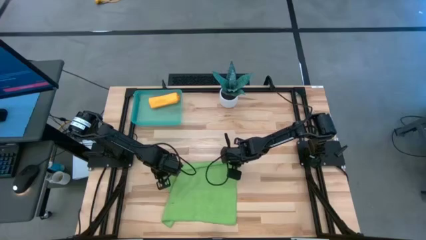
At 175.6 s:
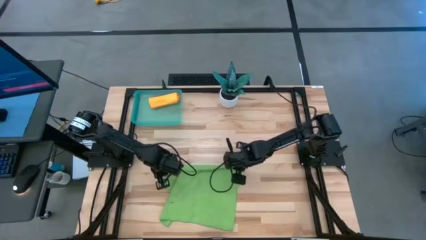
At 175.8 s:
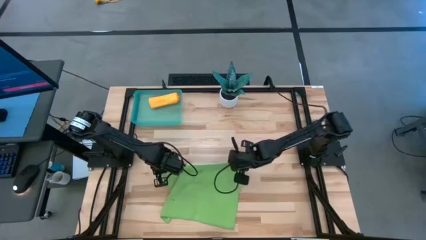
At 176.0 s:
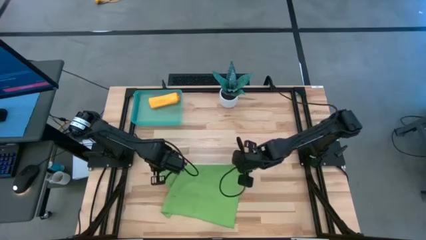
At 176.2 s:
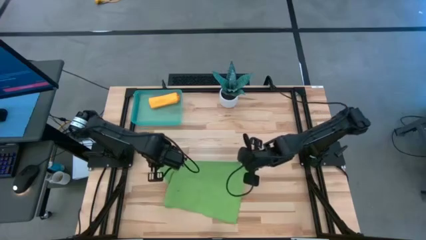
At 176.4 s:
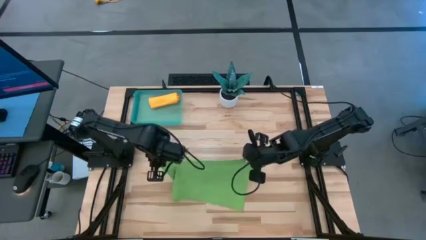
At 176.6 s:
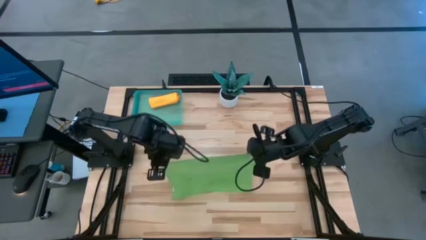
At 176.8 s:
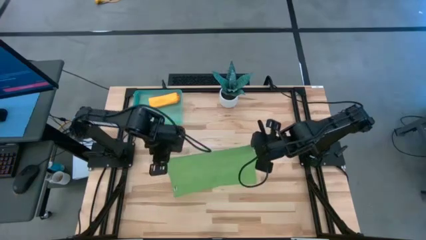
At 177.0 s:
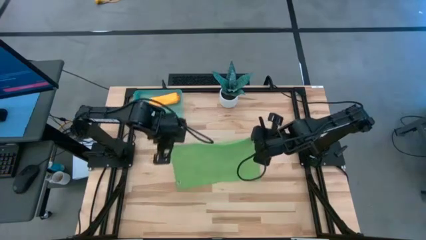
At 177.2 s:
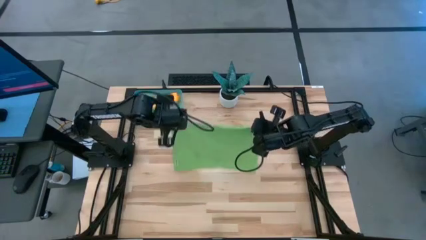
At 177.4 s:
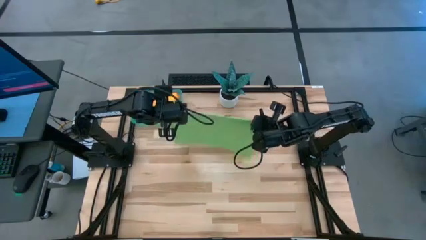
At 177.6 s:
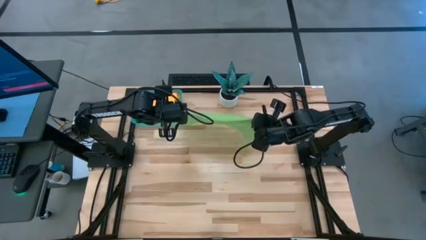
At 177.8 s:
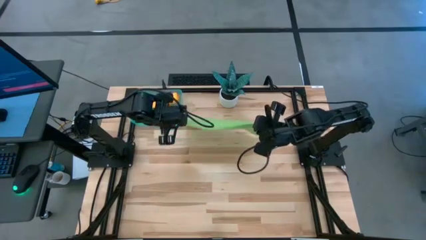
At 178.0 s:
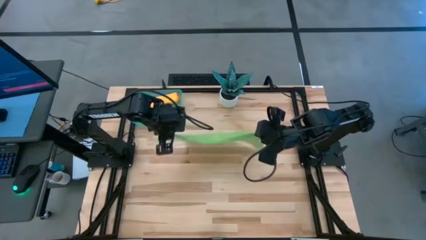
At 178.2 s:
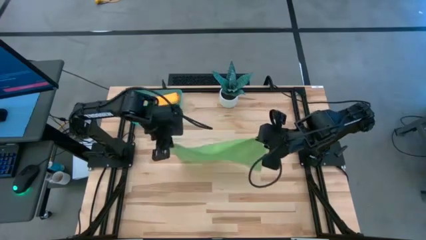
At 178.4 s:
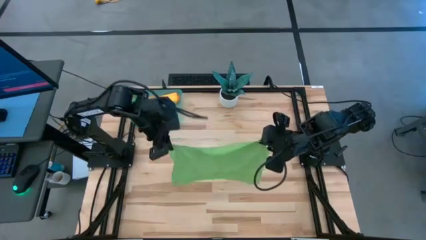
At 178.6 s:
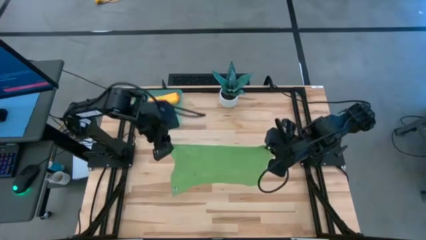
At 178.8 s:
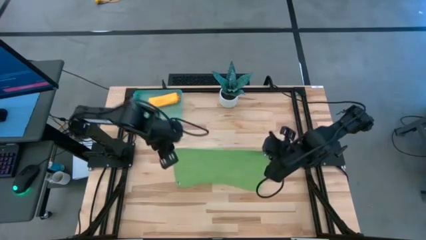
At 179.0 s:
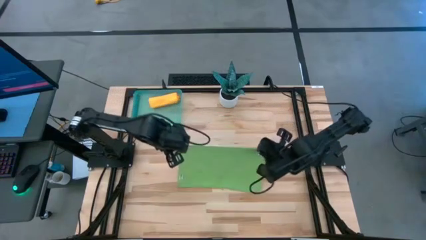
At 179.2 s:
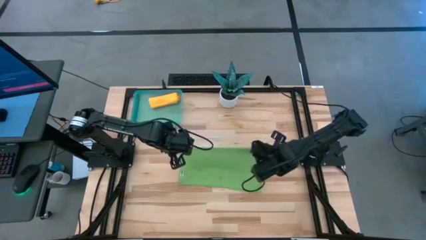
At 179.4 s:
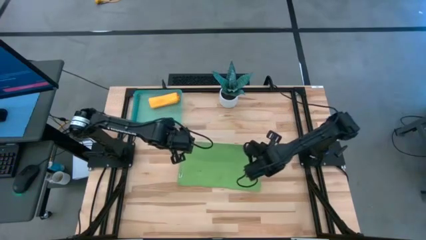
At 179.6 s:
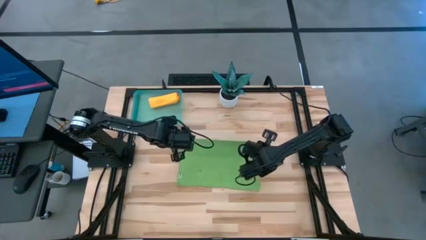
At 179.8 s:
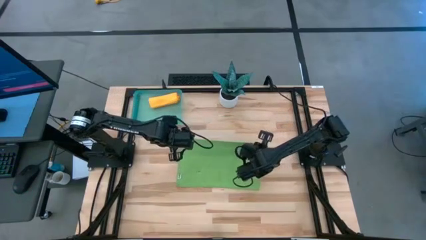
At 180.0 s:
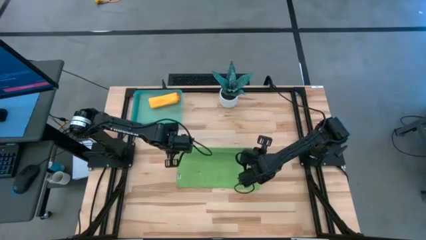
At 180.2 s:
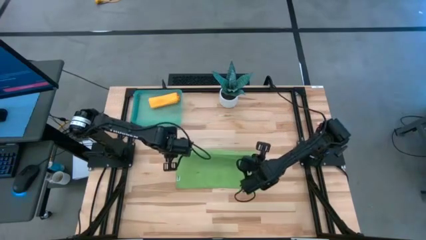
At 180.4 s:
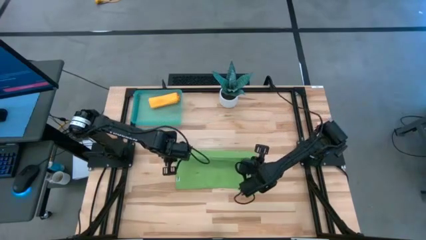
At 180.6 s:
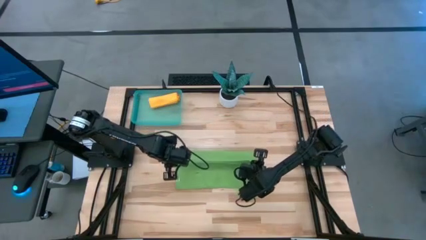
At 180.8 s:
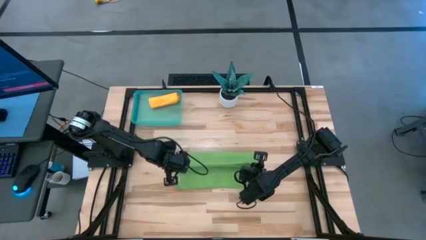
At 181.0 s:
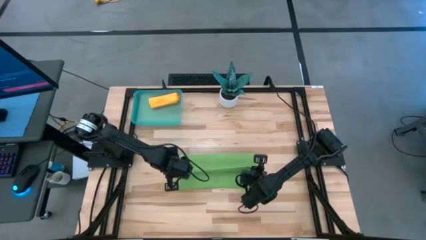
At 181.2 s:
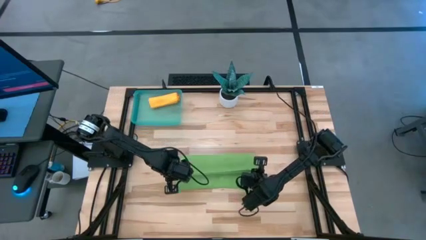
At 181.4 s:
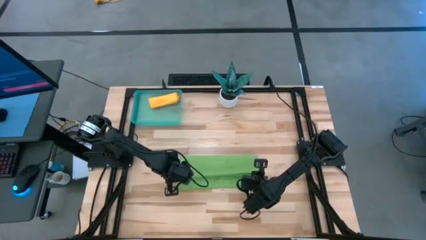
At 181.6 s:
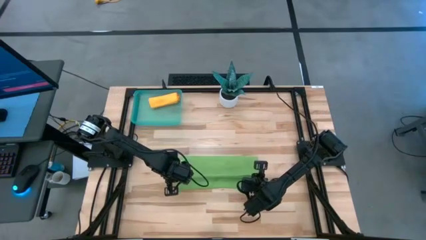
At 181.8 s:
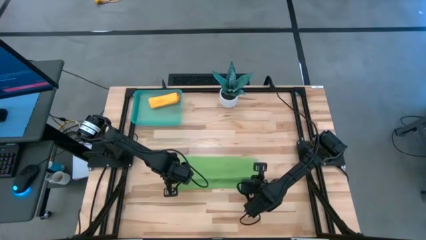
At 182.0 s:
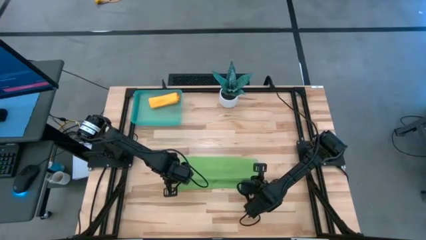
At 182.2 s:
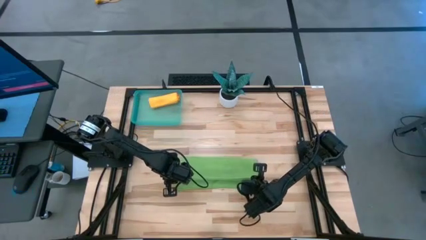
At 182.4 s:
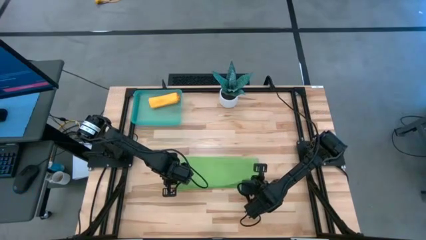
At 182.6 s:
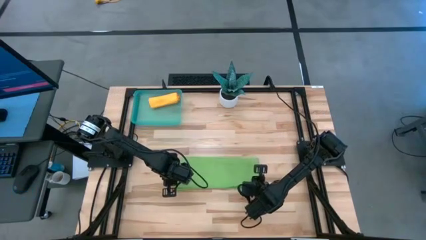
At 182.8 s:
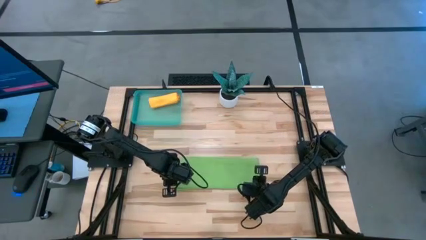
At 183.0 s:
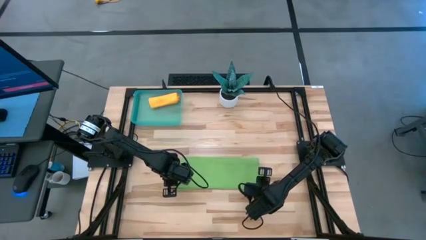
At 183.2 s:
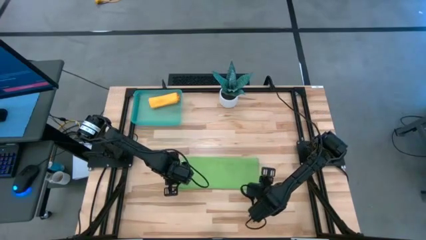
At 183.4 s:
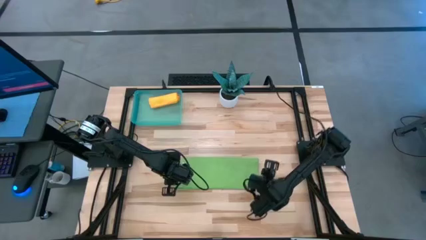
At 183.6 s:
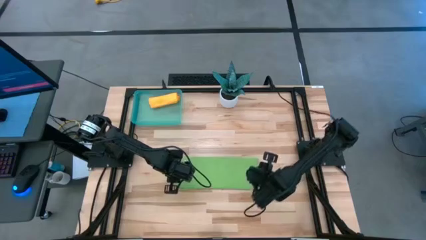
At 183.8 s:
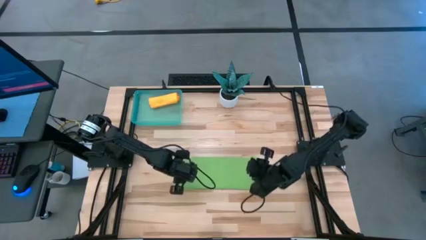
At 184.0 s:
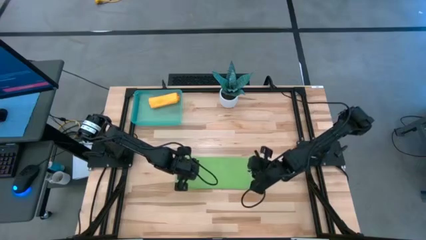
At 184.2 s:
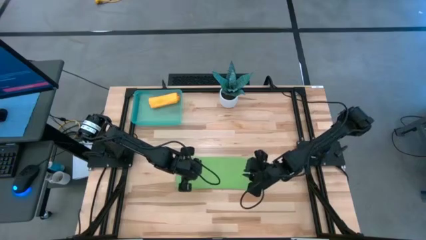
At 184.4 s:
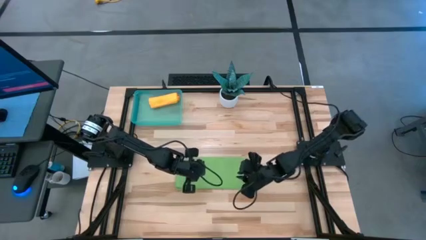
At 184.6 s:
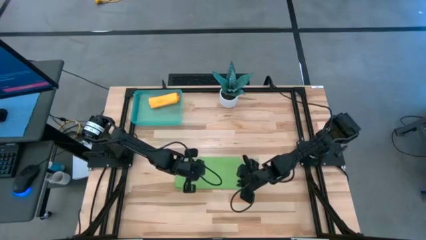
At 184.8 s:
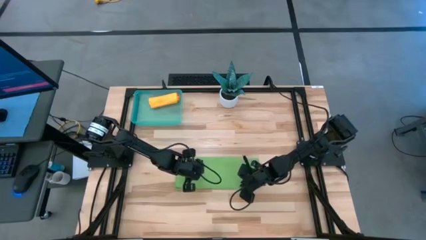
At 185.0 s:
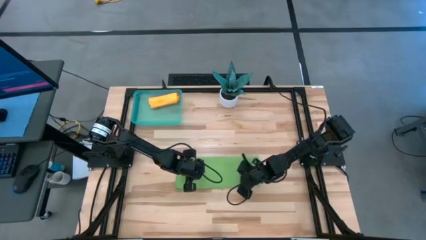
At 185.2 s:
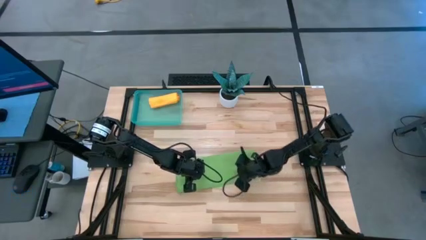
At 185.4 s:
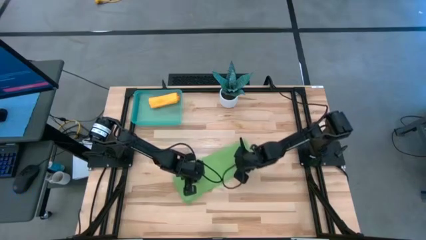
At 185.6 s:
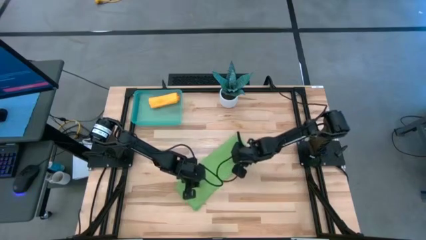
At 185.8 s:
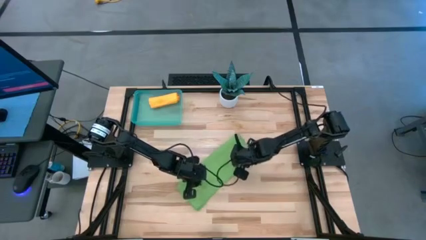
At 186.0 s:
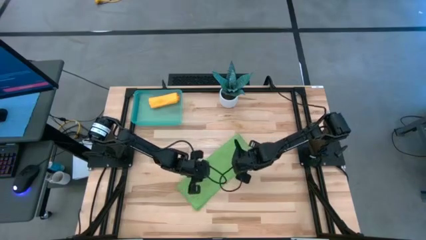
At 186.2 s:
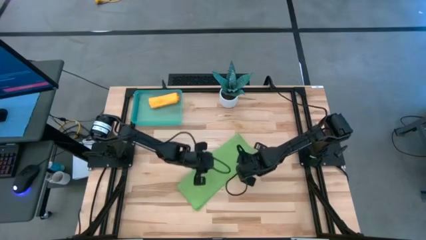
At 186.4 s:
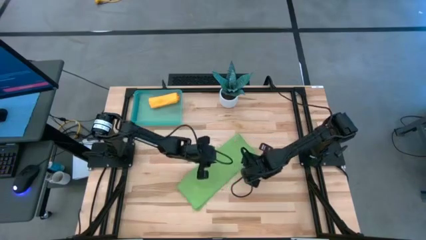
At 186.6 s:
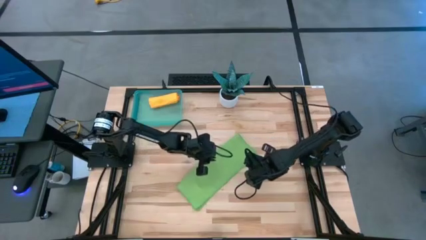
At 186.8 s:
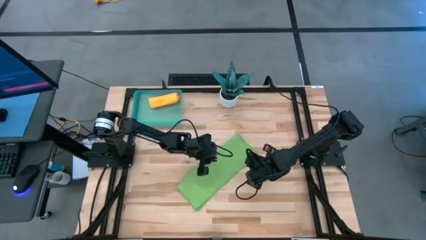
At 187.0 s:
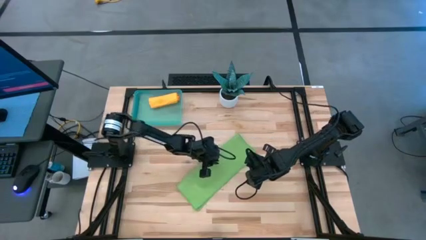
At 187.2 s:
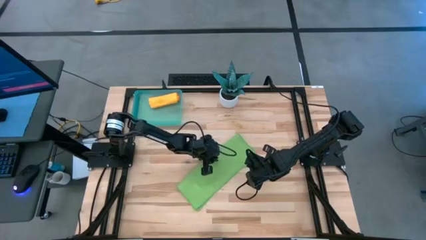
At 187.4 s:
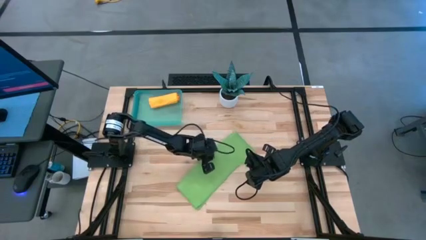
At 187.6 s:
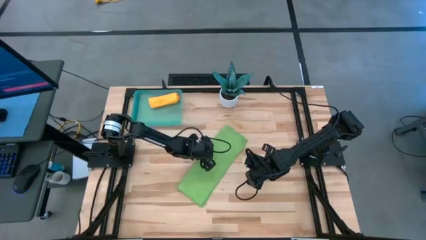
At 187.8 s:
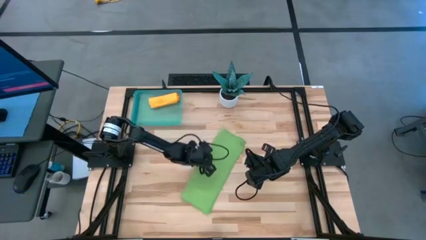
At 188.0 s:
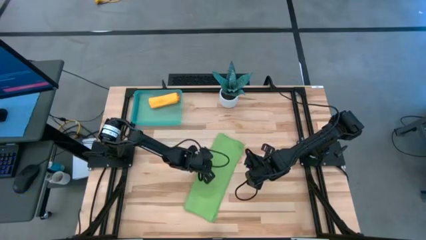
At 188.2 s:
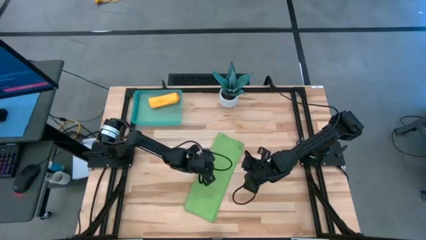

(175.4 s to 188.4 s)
Task: Roll microfiber towels into tight, uniform cylinder then place into a basket
Fold the light green microfiber cloth

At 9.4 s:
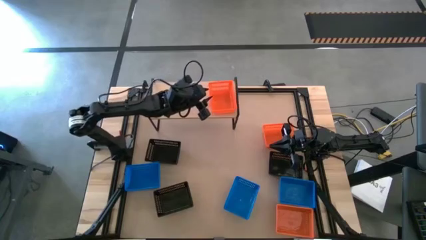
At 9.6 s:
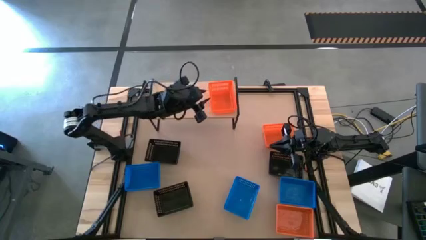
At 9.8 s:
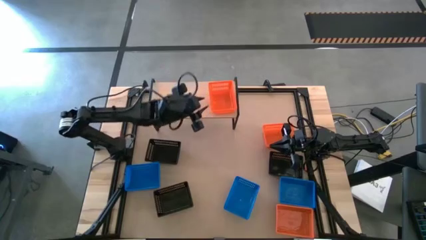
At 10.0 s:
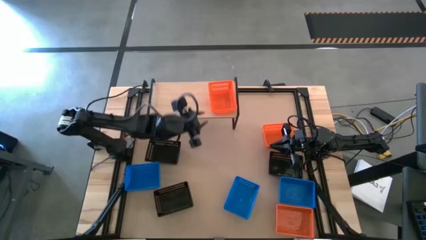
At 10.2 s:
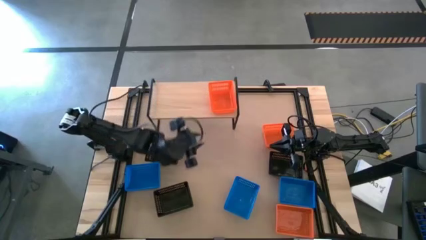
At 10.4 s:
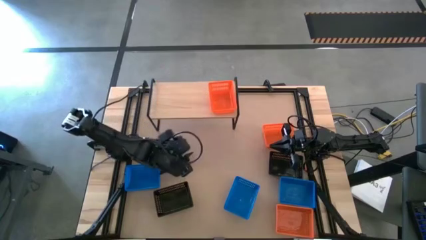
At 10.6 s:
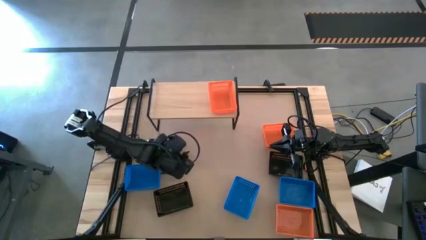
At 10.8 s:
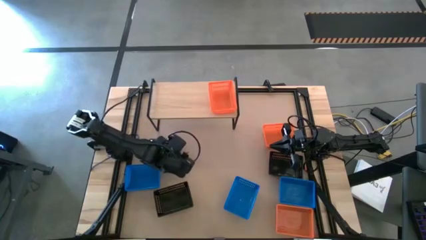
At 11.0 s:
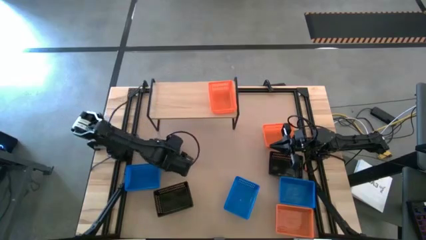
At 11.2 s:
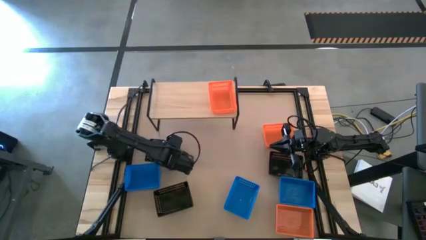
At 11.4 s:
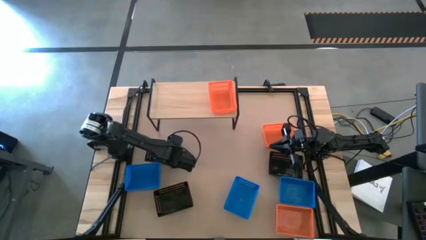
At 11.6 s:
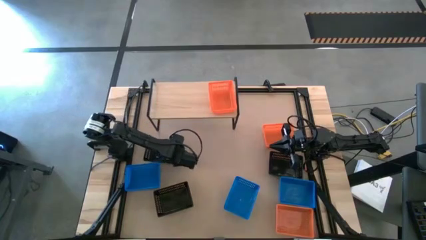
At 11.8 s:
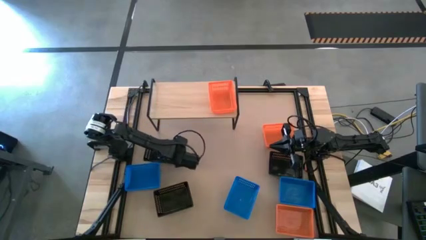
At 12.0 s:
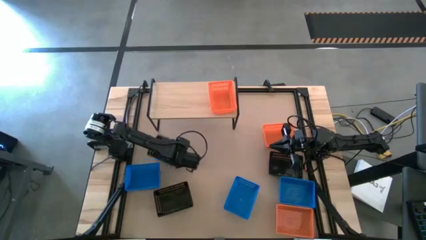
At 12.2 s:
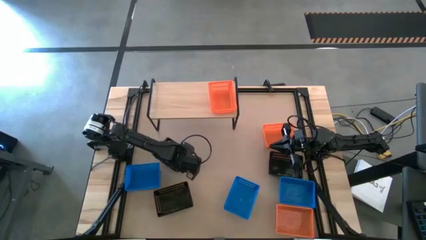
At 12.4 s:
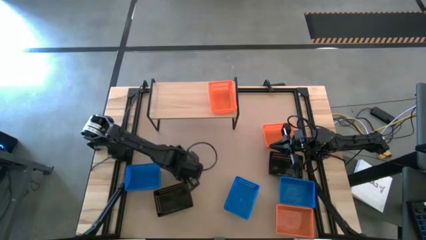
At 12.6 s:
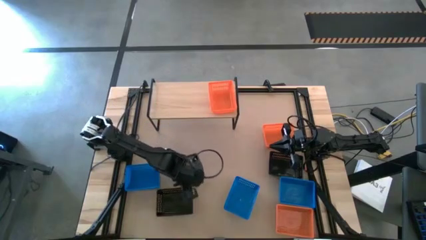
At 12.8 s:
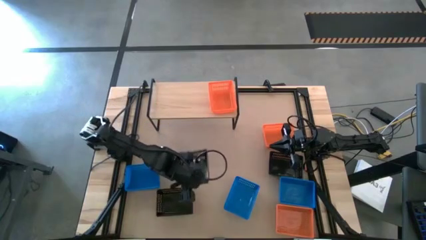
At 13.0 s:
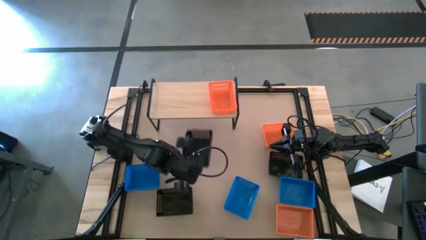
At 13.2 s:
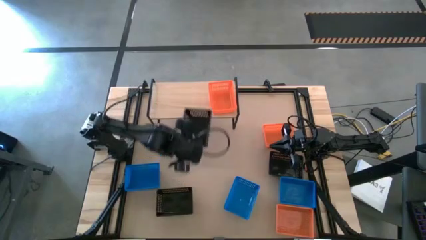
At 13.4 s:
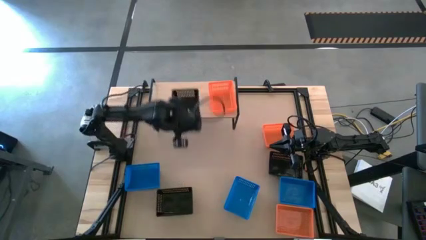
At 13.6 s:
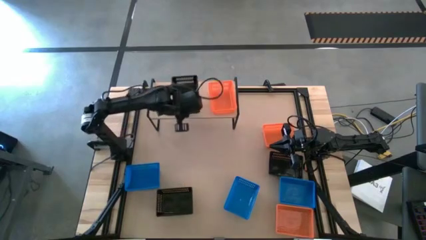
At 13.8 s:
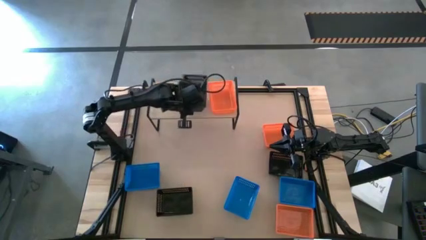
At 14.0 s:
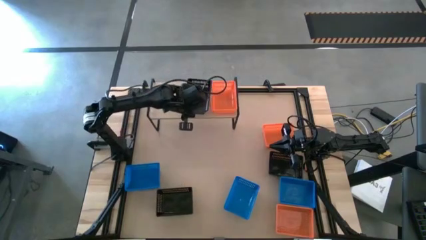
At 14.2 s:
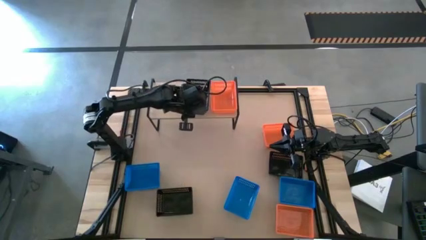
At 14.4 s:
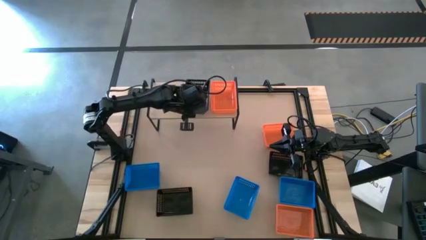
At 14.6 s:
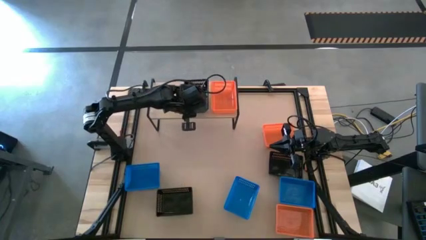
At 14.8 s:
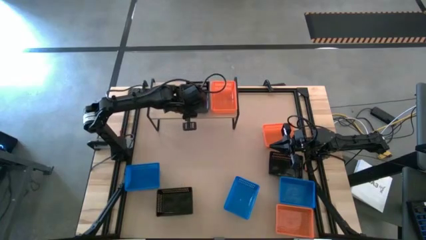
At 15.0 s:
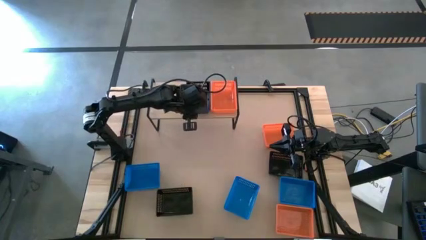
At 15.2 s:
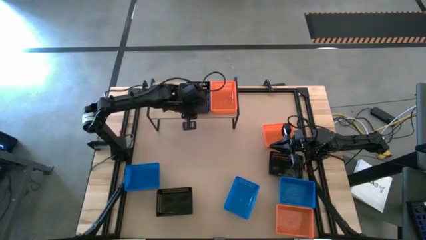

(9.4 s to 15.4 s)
Task: Stack baskets on shelf by color
Put the top left black basket on the shelf
